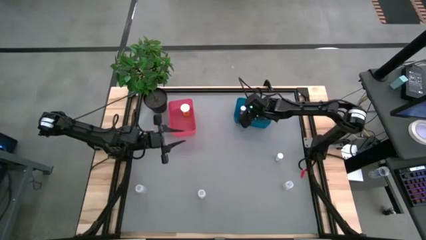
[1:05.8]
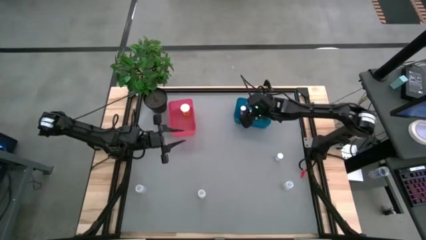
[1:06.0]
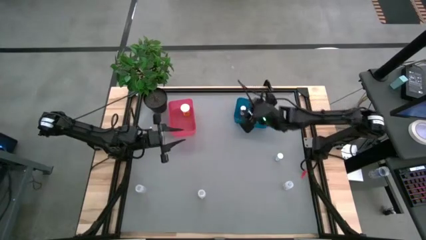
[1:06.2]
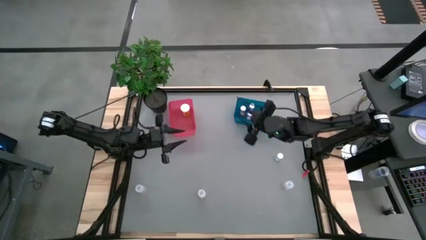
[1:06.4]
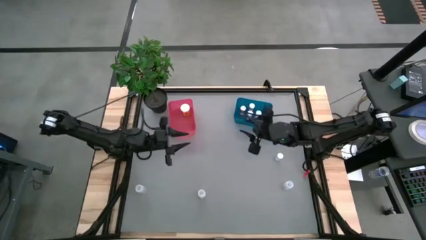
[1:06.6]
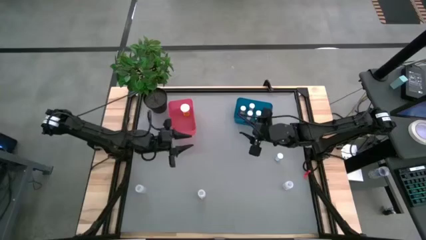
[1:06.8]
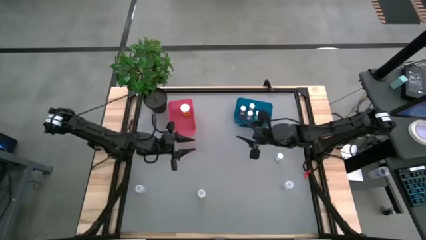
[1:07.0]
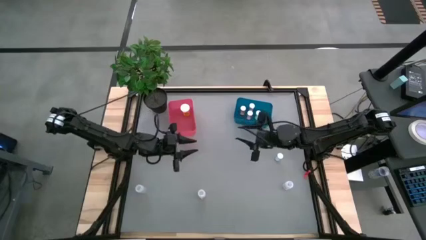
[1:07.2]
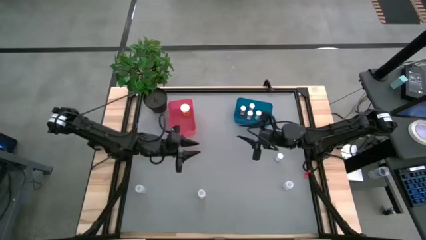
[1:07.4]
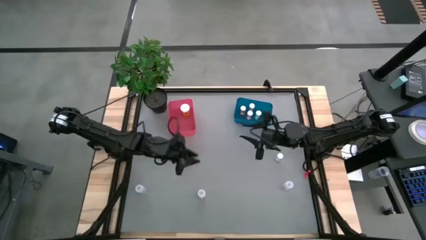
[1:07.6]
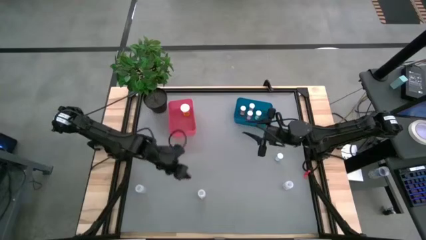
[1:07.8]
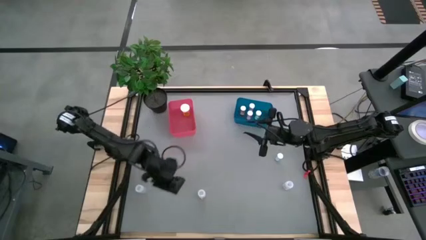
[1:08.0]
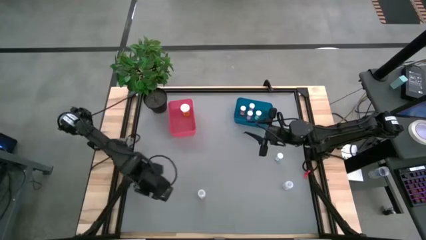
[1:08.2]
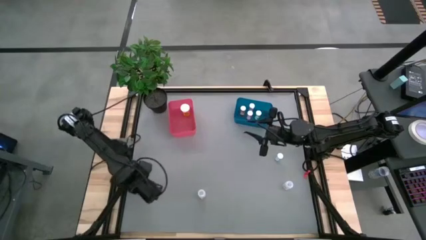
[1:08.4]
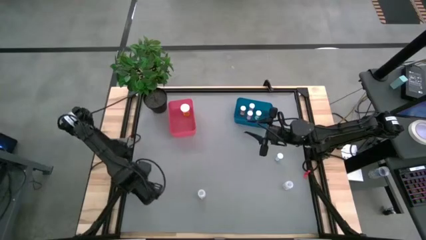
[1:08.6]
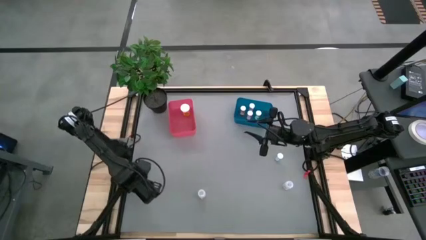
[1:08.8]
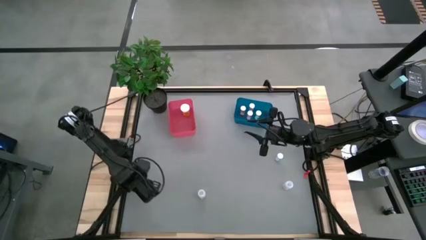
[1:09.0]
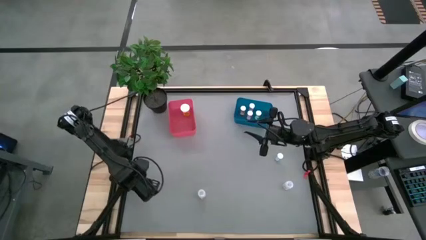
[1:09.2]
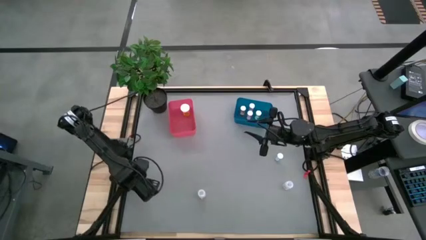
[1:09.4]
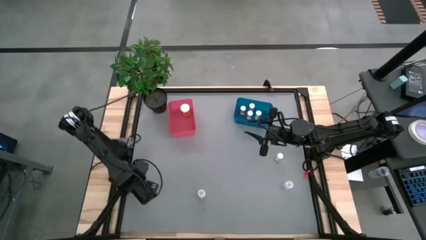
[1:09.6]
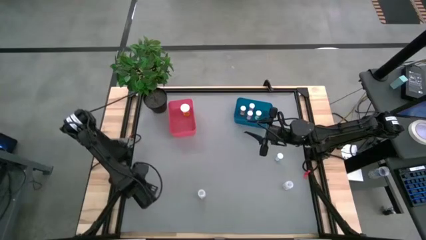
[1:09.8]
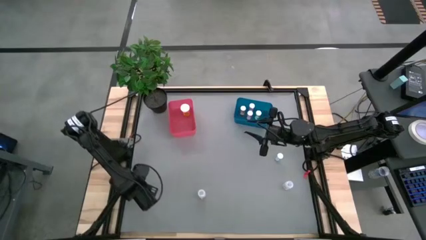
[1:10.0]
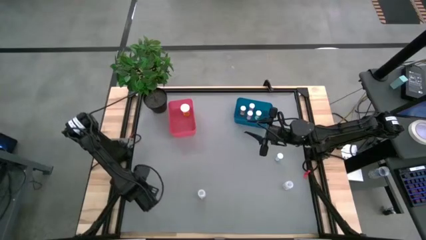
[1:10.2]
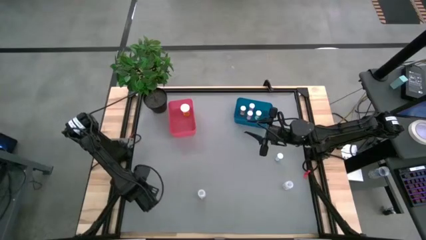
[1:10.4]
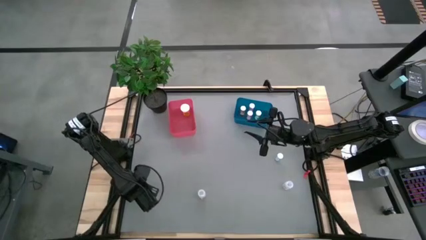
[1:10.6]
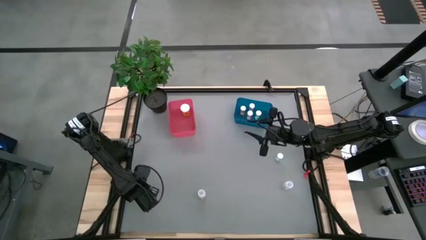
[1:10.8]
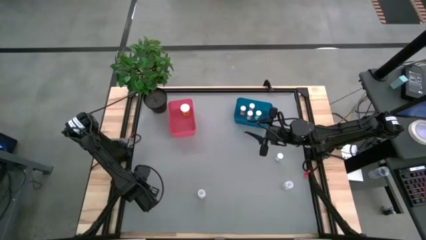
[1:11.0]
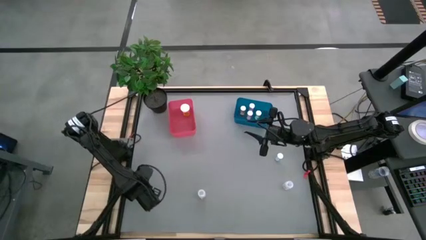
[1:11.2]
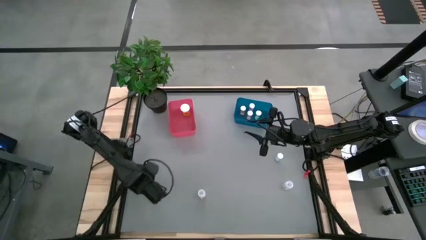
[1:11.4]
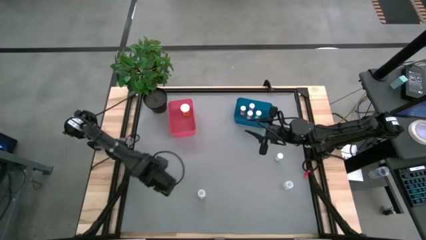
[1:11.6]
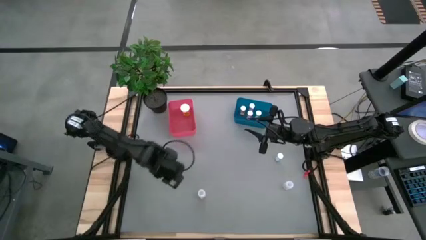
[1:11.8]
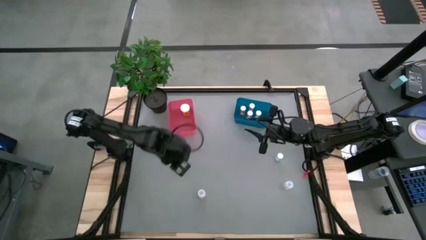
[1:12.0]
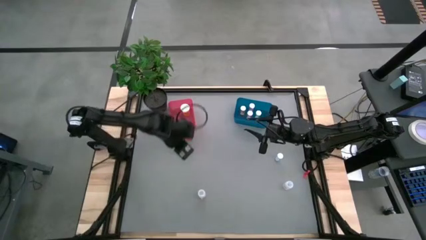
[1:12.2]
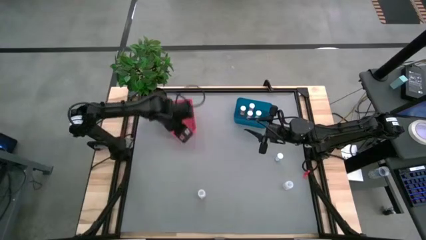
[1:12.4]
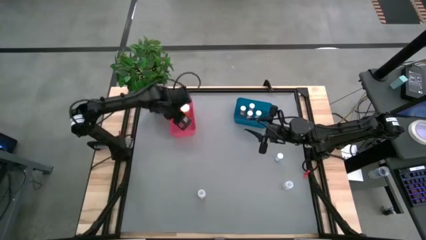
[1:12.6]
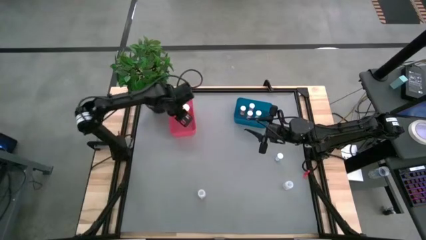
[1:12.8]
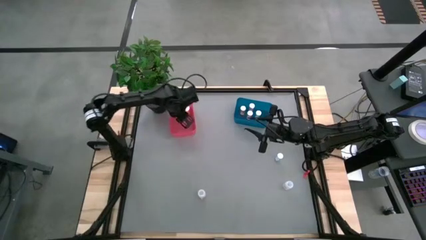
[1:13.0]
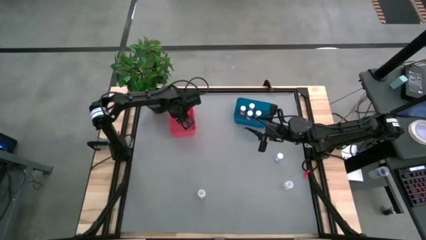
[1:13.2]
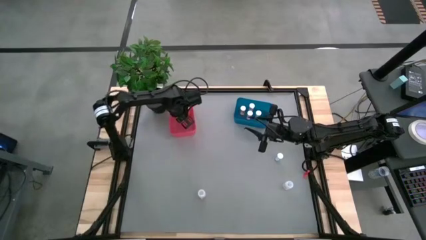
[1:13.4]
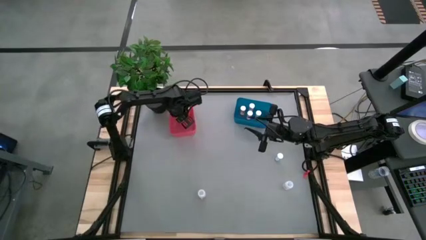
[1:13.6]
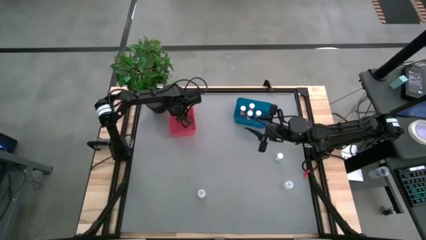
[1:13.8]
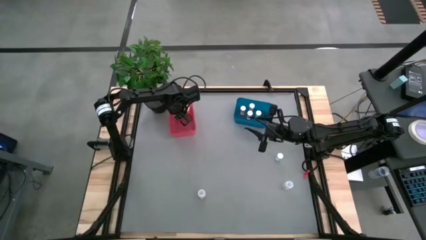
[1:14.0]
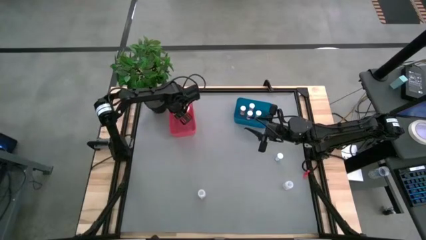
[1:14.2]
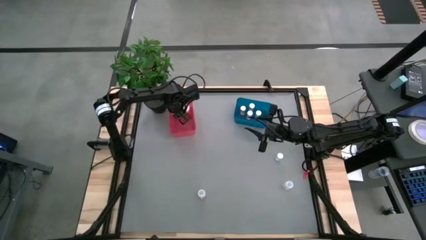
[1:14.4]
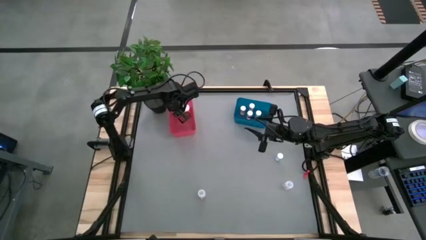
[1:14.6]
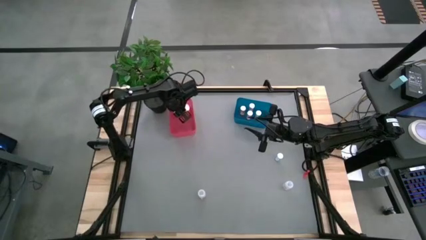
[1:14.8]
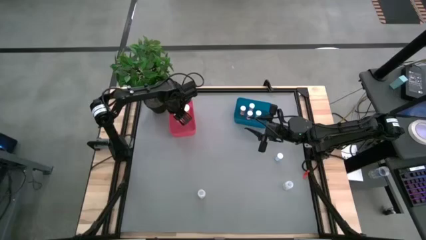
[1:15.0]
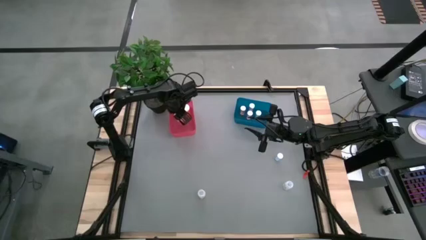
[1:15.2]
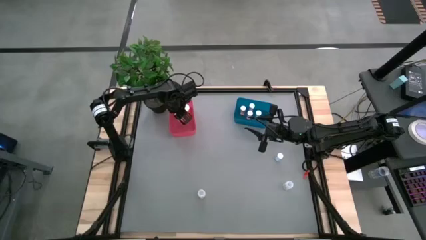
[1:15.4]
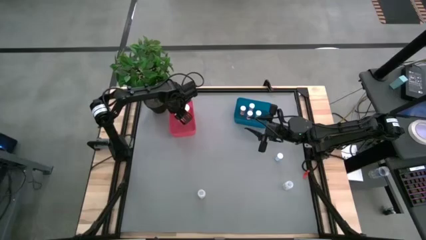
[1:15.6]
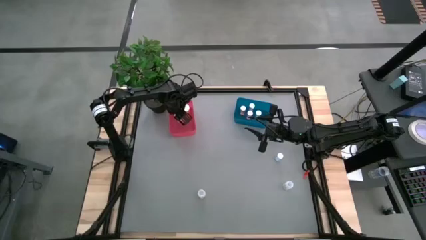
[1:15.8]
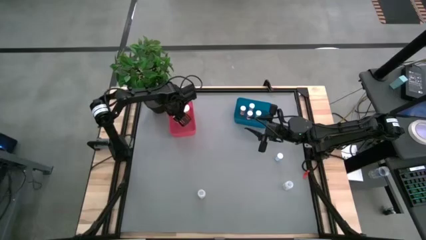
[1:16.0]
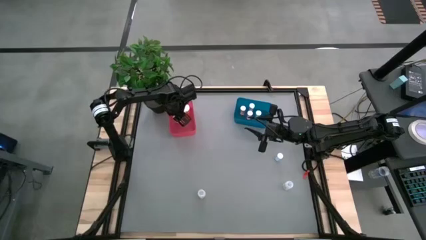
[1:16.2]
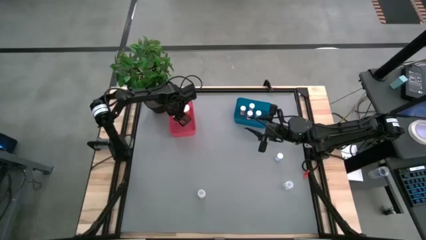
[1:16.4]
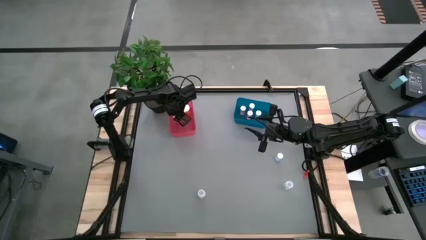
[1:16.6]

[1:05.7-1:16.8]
Task: Pick and place medicine bottles into bin by pill shape (circle, oval)
Put the left transparent capsule bottle into the red bin

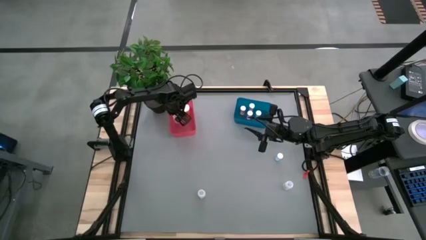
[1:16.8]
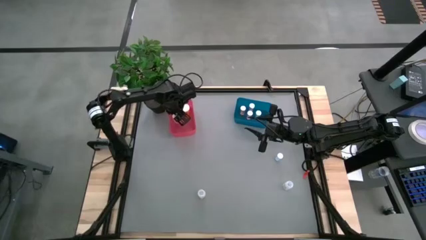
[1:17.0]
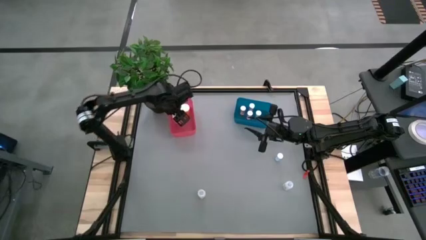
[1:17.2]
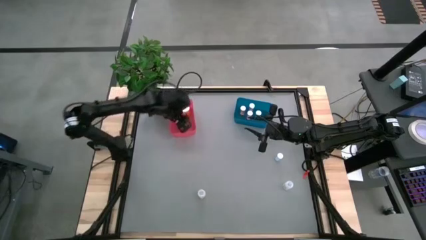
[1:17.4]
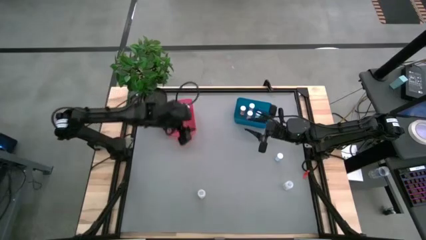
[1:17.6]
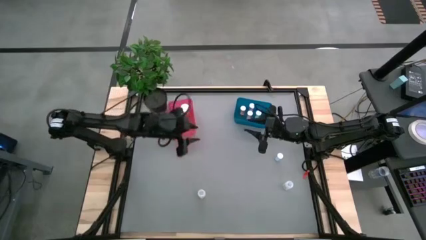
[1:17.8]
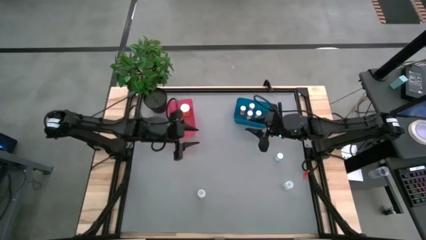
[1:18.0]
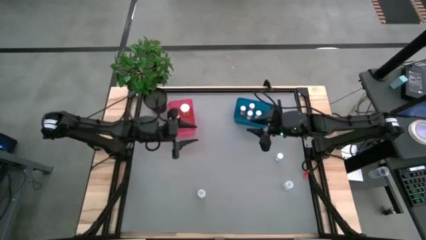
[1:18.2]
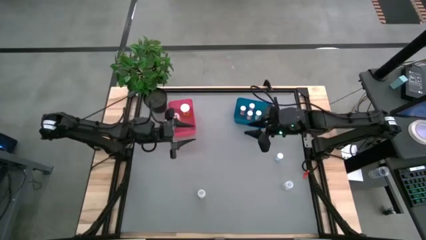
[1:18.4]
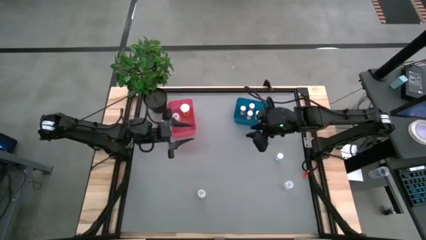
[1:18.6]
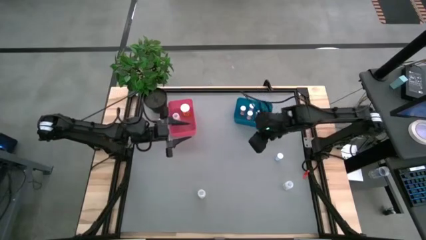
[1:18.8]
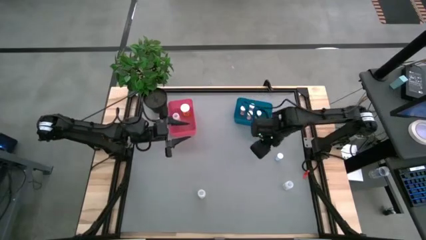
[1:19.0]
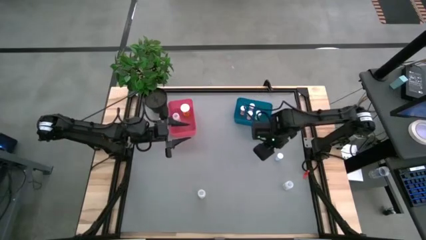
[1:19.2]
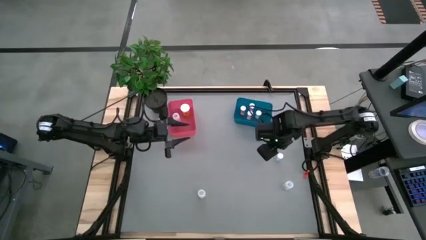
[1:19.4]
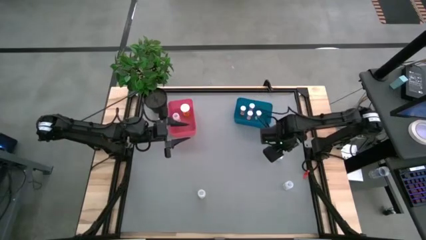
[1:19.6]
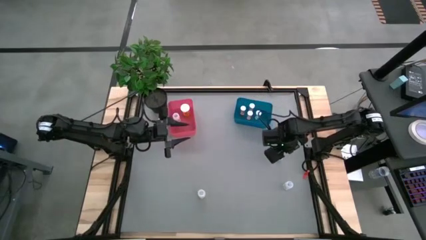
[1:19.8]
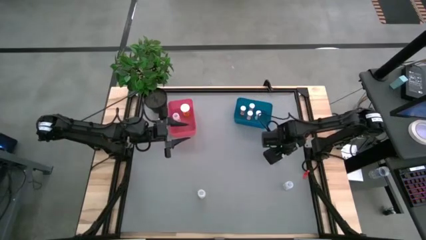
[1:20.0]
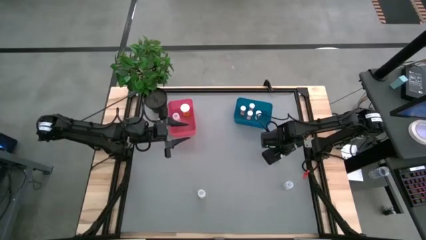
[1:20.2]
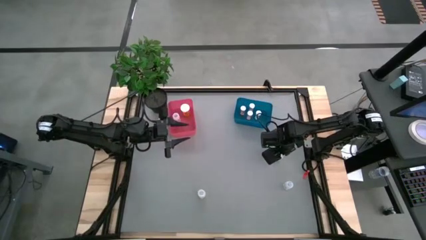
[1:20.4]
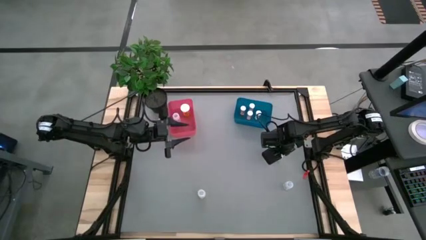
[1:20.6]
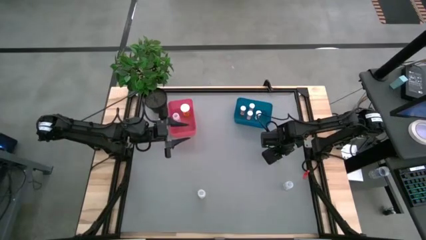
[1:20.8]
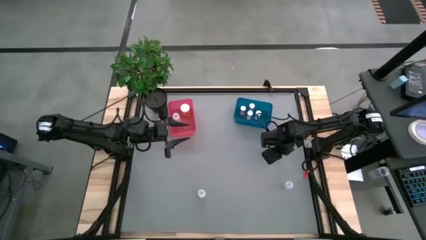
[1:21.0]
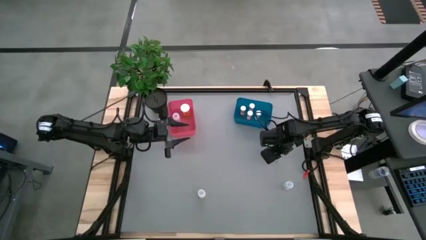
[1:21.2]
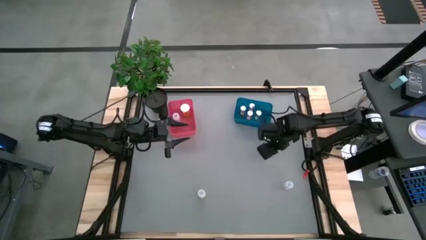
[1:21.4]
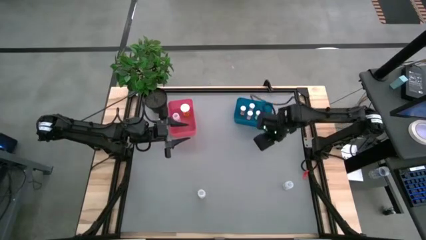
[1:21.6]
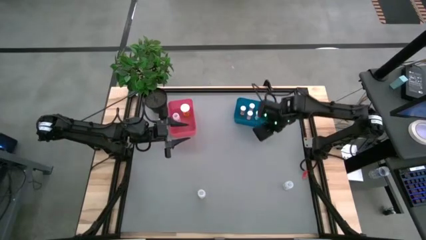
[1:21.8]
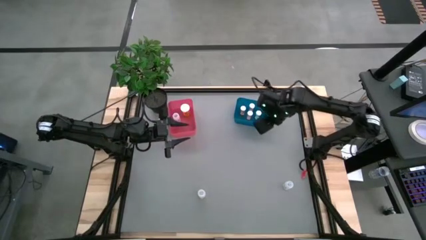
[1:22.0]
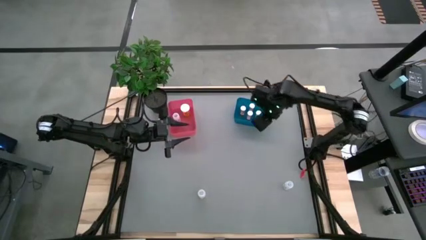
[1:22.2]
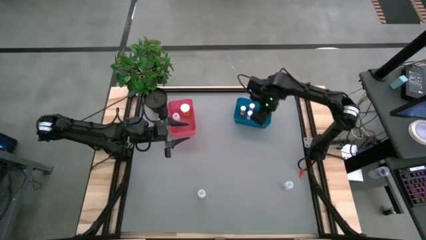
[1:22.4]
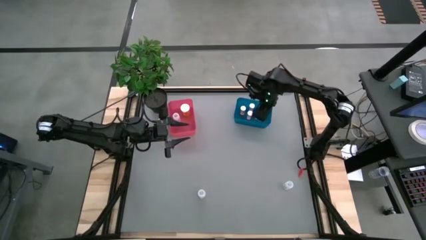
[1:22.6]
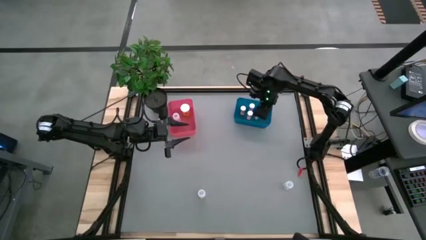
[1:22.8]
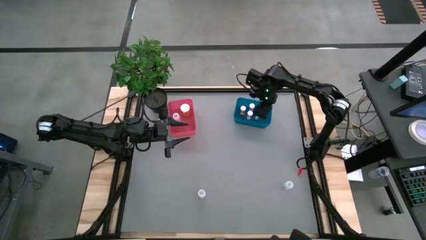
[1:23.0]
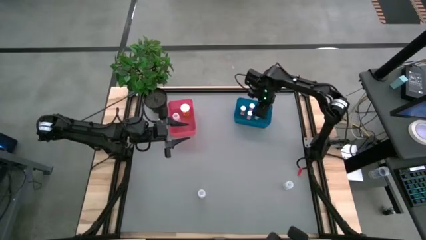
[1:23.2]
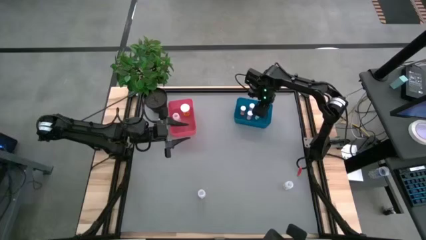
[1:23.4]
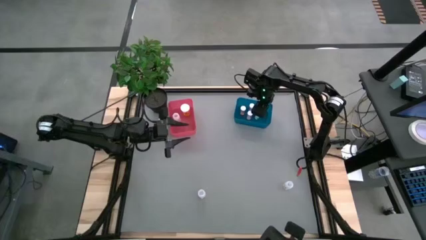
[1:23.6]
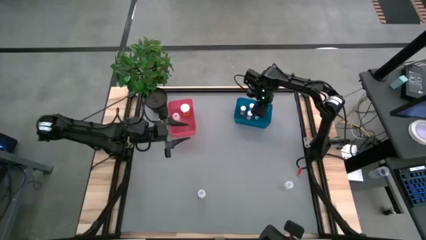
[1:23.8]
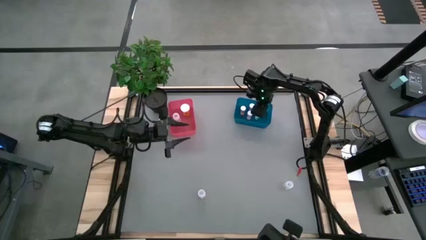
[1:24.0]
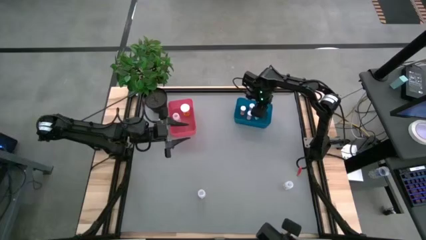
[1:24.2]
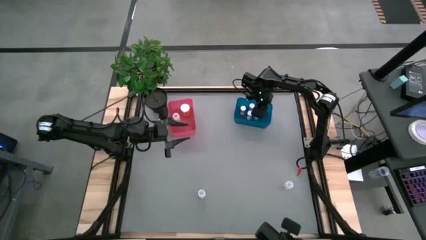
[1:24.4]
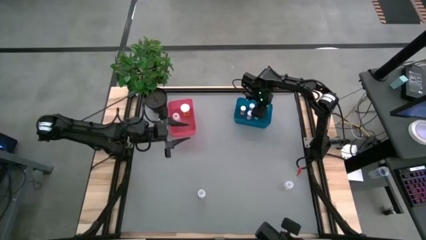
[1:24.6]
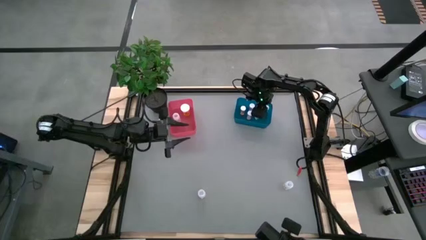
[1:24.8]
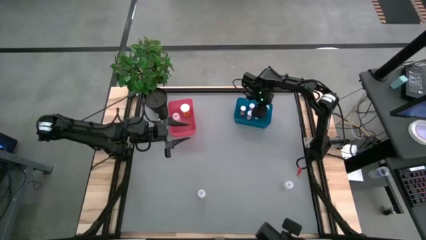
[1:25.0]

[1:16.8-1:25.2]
Put the blue tablet bottle into the blue bin
